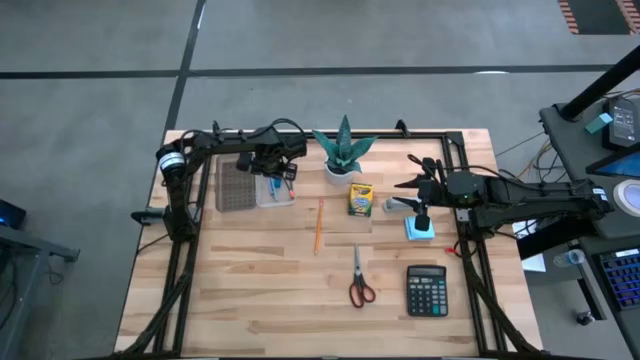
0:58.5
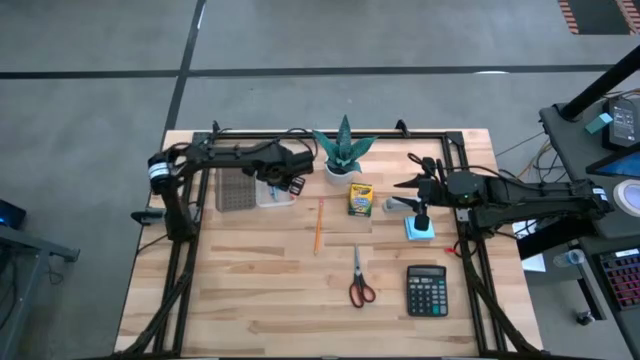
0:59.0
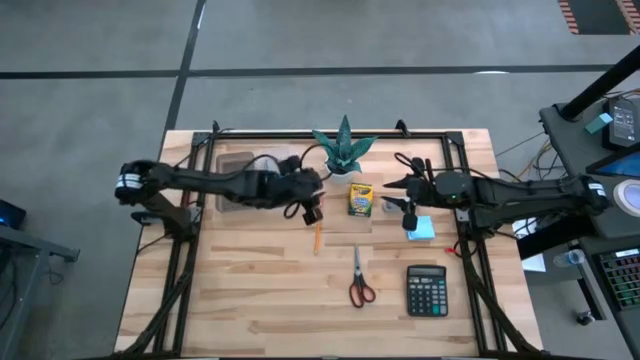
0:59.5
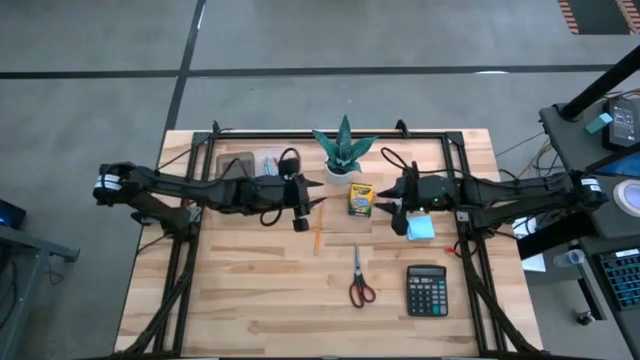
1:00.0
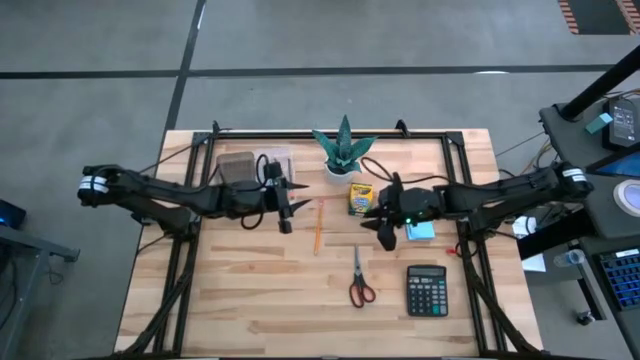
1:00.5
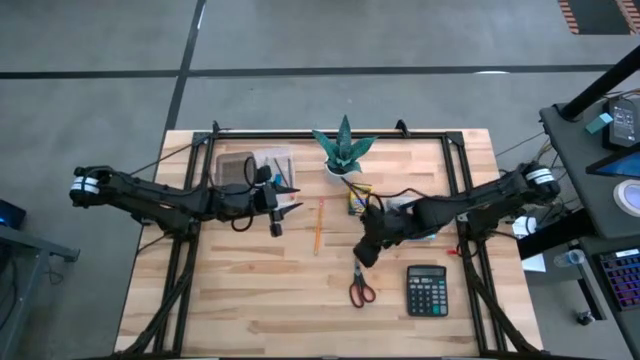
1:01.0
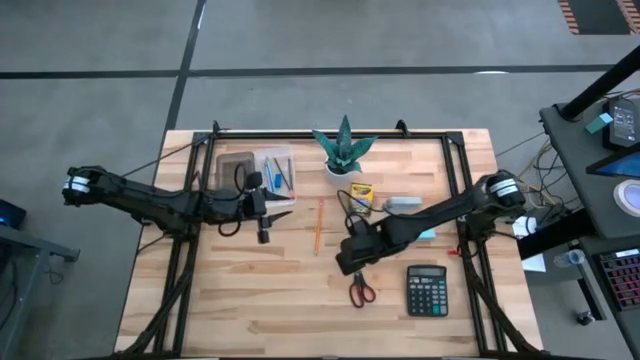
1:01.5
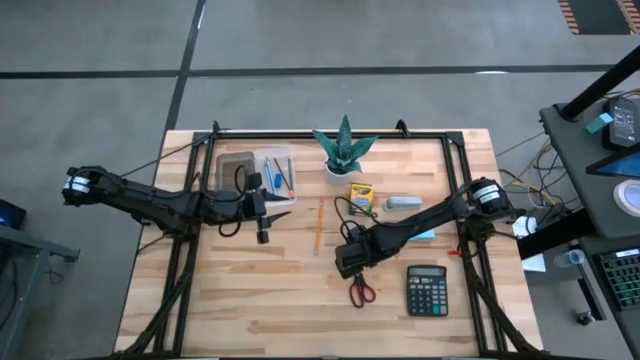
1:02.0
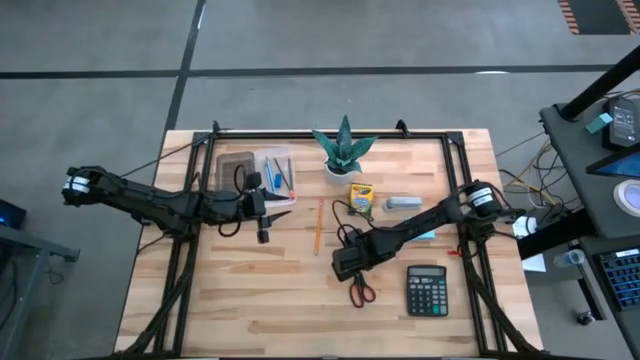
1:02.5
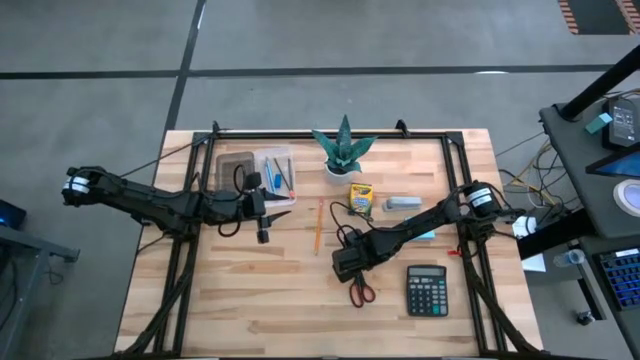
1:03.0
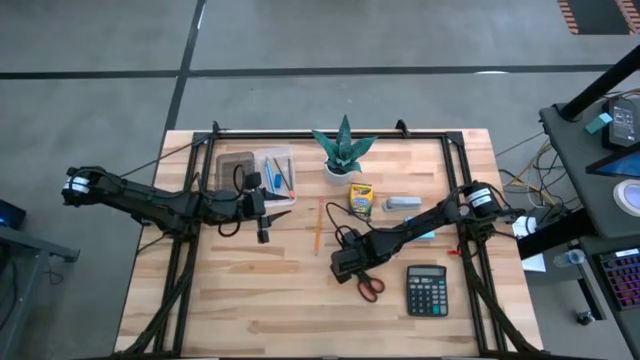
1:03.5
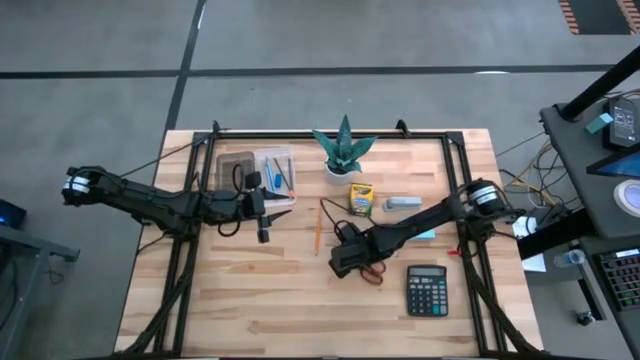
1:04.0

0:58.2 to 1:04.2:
Task: Pack school essentials
Put the black scissor into the black supply box

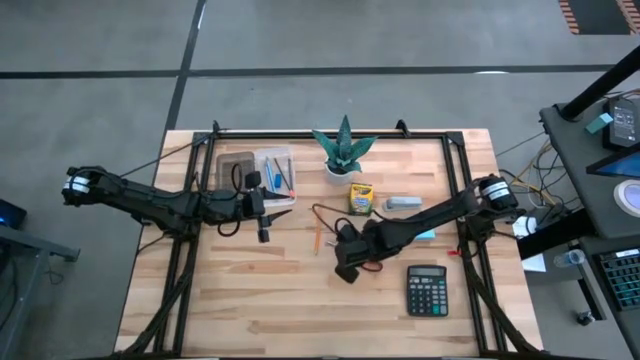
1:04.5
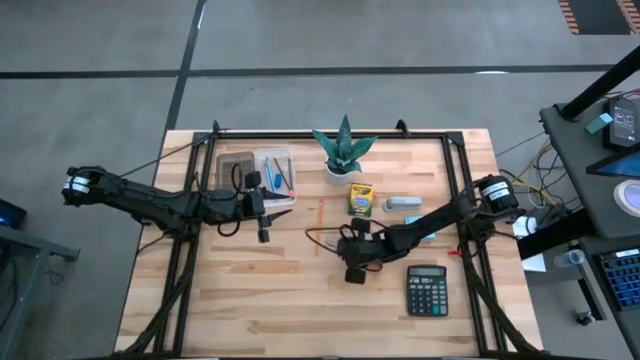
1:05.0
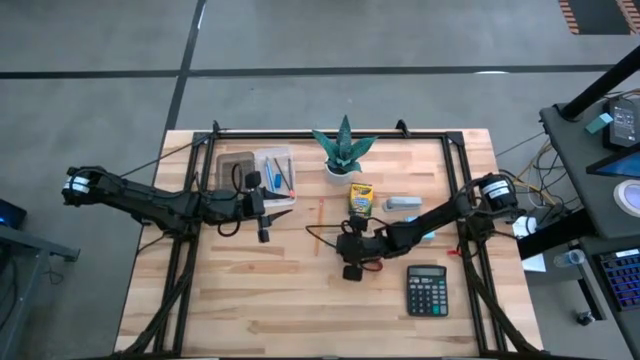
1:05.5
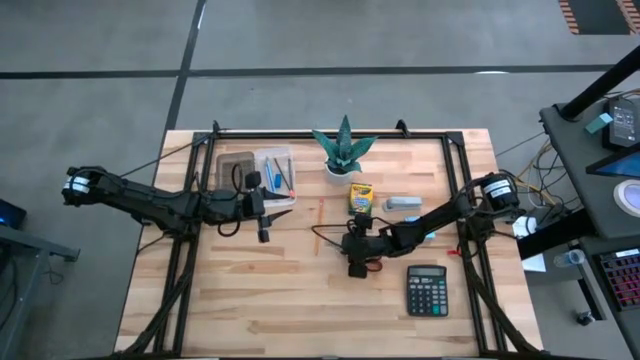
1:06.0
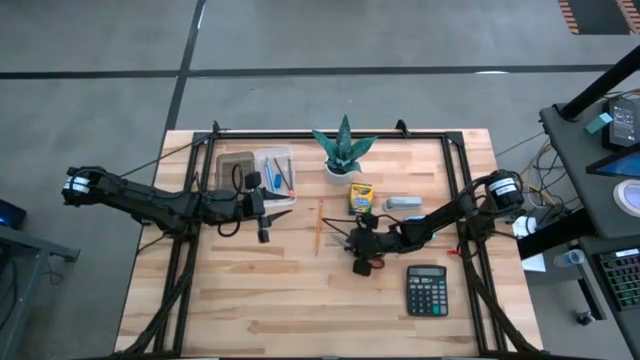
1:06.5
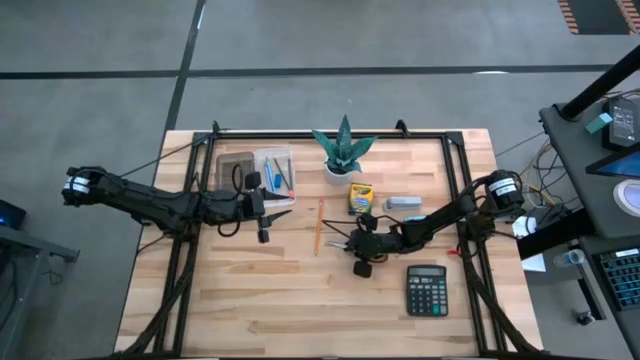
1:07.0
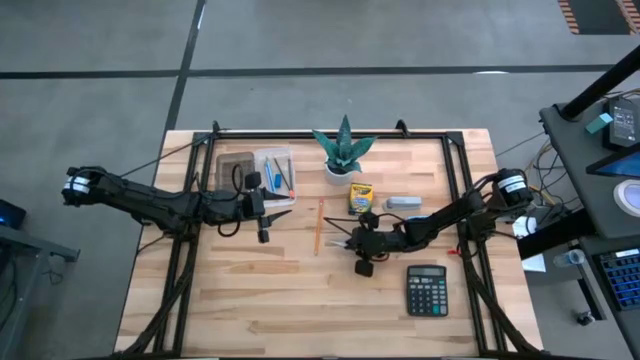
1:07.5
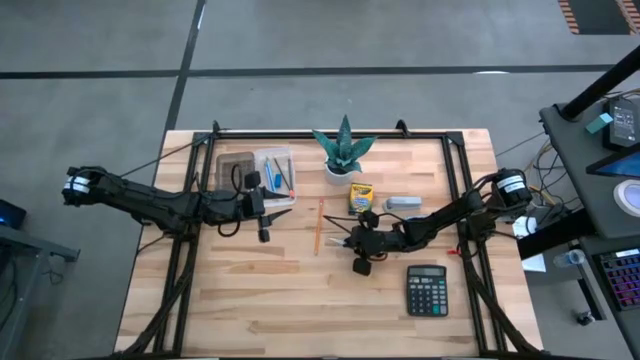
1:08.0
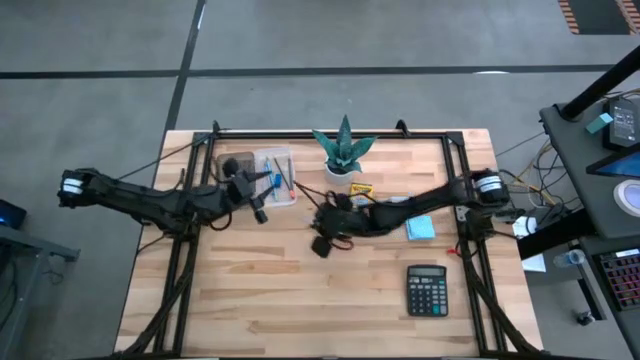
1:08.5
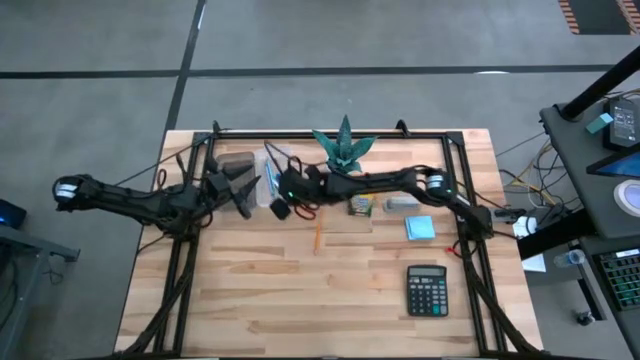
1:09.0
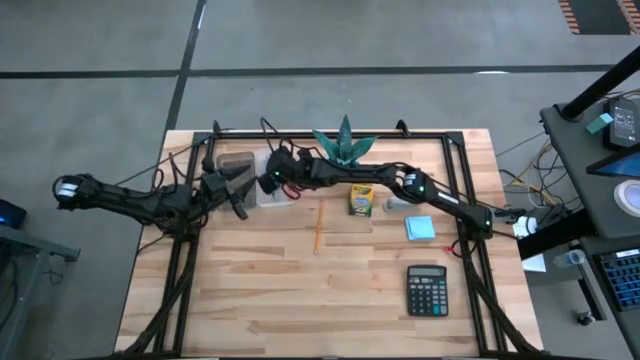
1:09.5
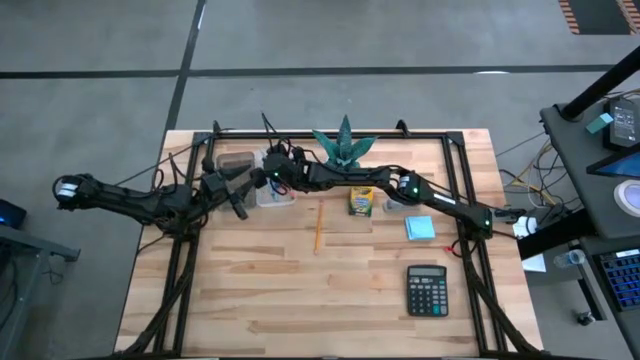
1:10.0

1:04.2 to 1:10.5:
Put the black scissor into the black supply box

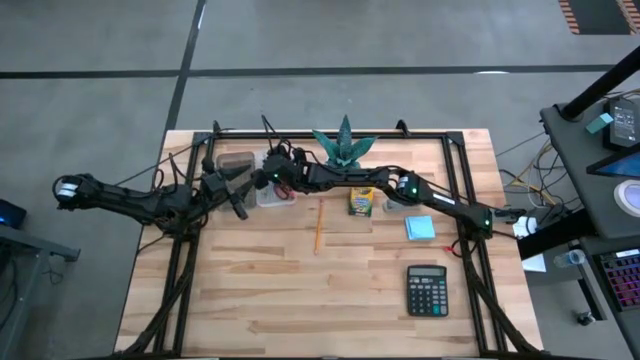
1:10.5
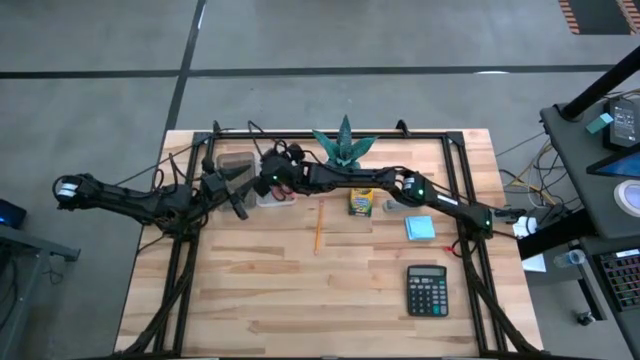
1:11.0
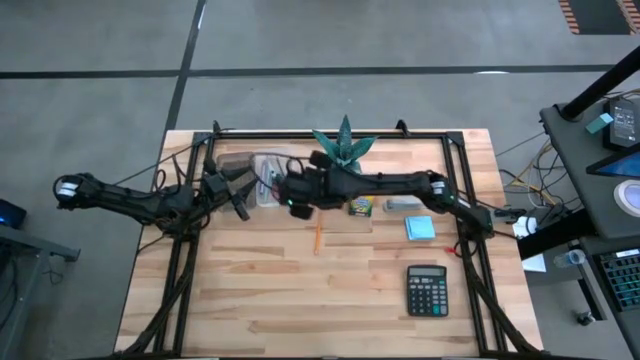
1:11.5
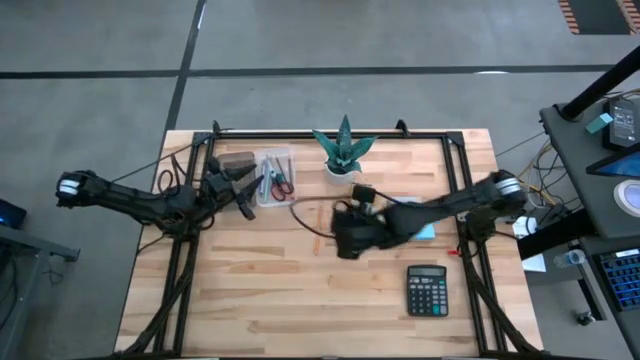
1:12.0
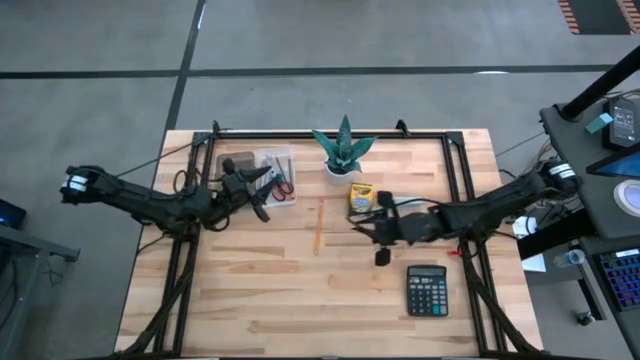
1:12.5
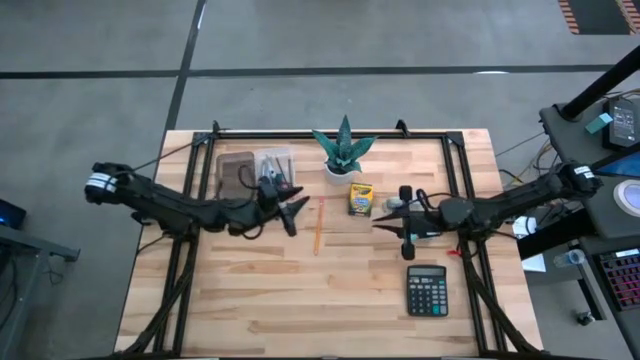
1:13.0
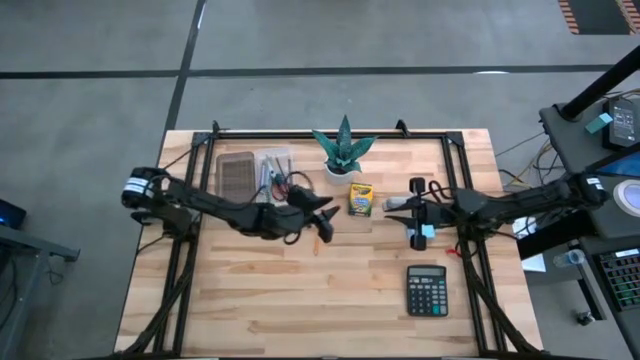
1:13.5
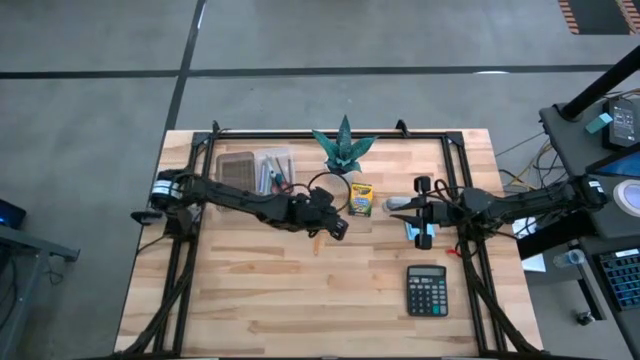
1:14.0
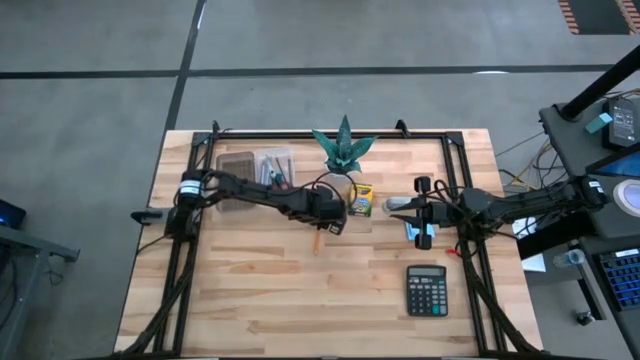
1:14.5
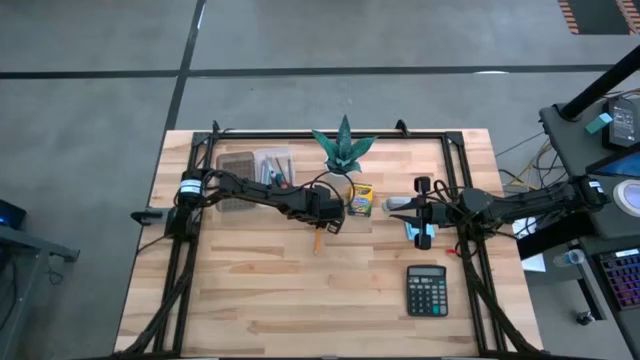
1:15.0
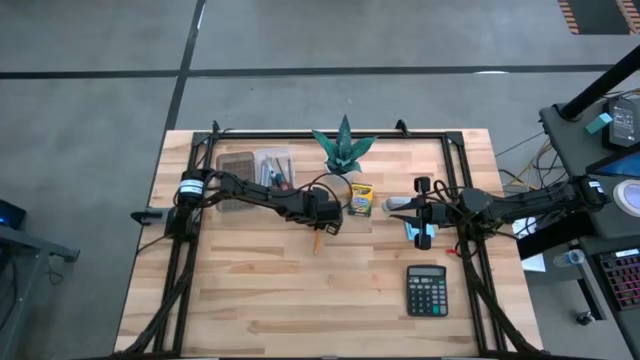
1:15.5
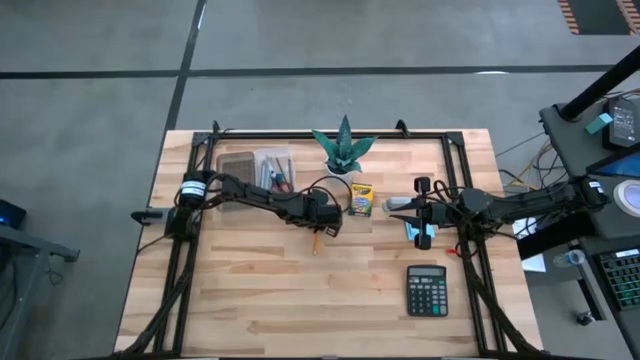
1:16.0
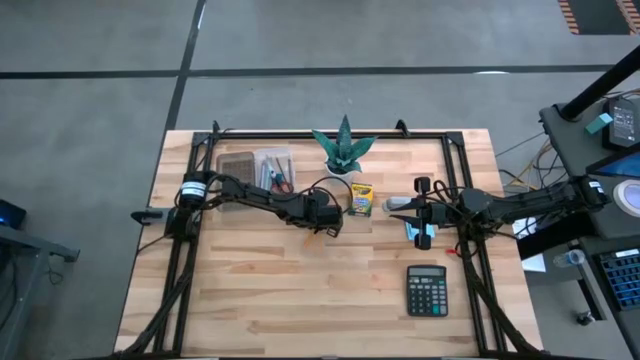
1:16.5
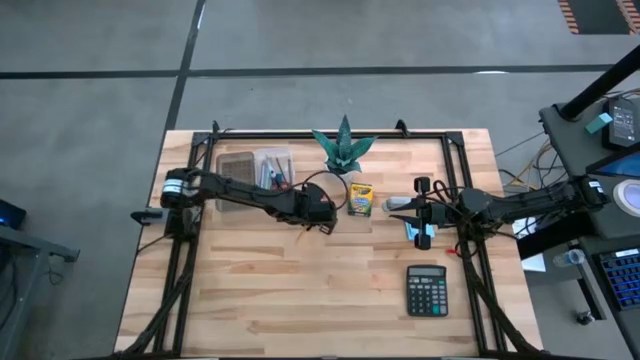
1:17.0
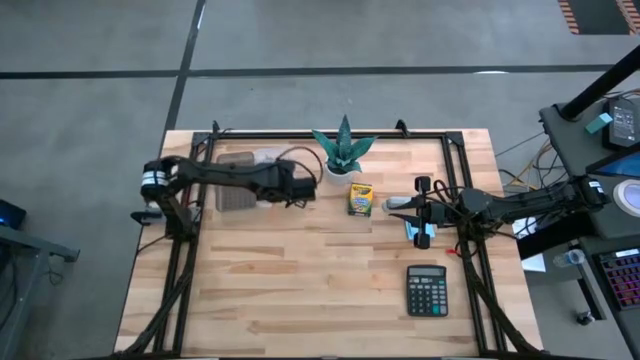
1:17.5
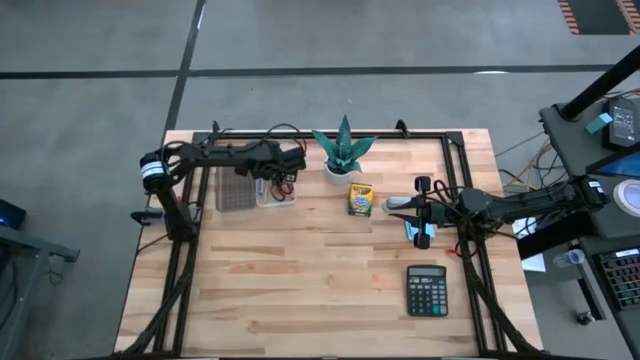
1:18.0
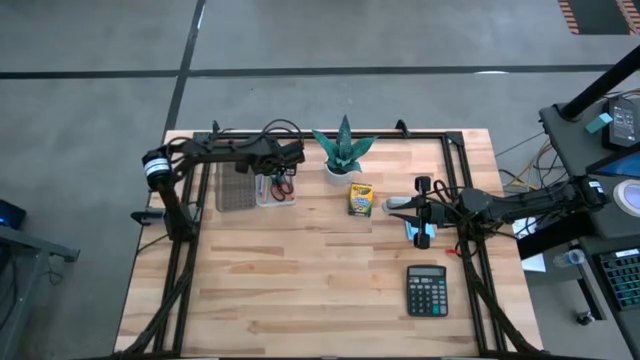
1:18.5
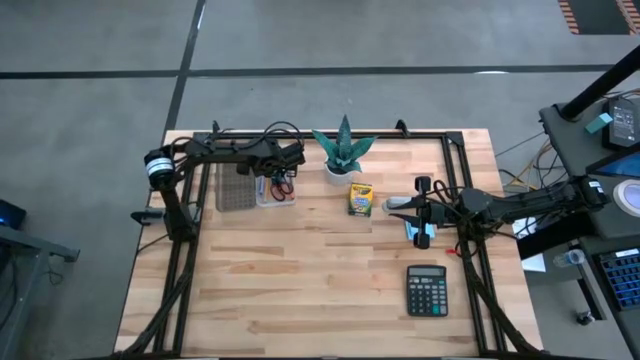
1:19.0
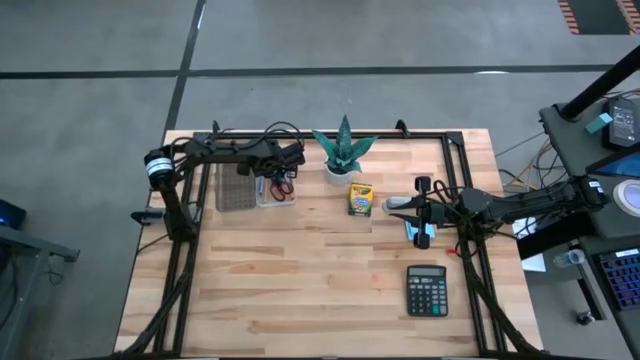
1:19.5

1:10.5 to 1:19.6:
Put the yellow pencil into the black supply box
